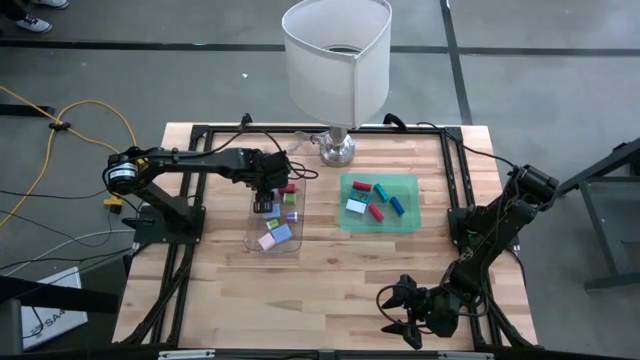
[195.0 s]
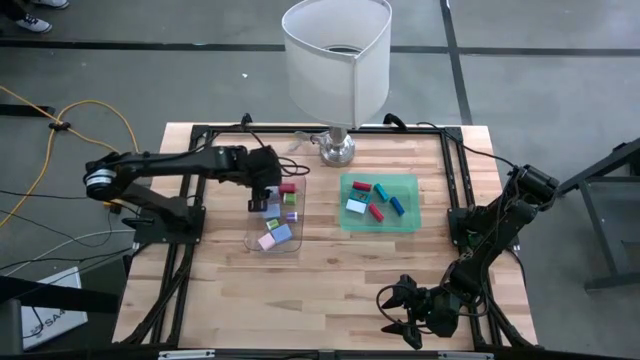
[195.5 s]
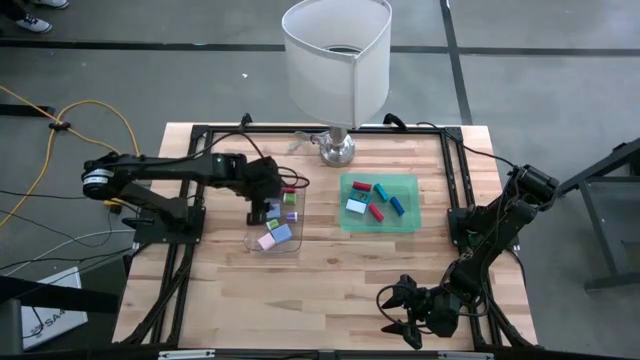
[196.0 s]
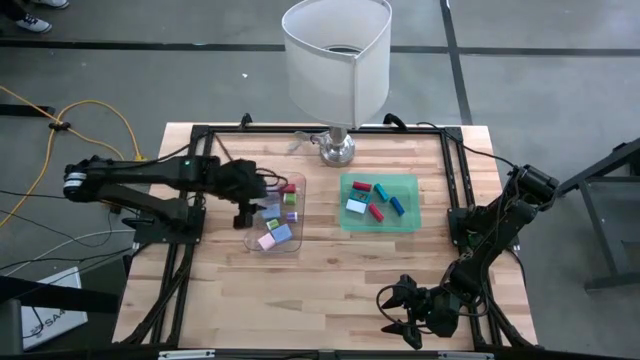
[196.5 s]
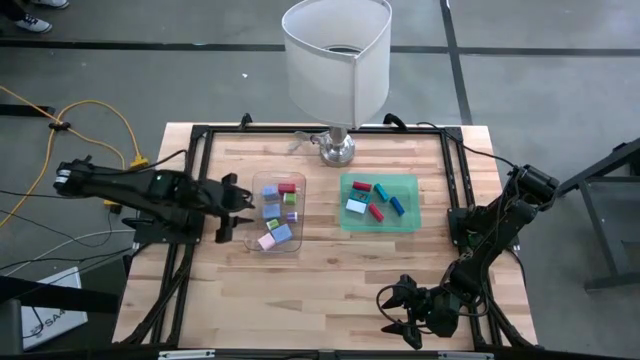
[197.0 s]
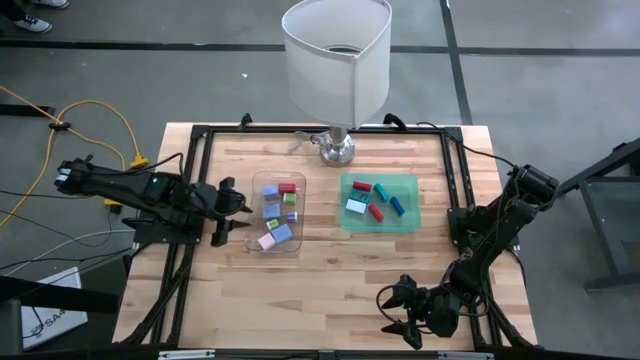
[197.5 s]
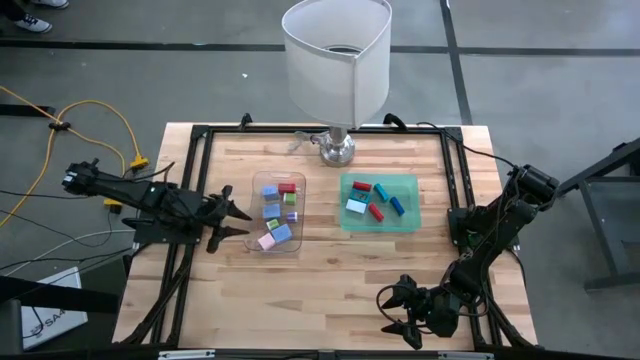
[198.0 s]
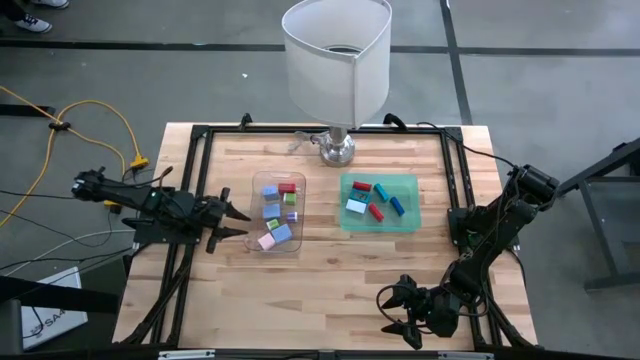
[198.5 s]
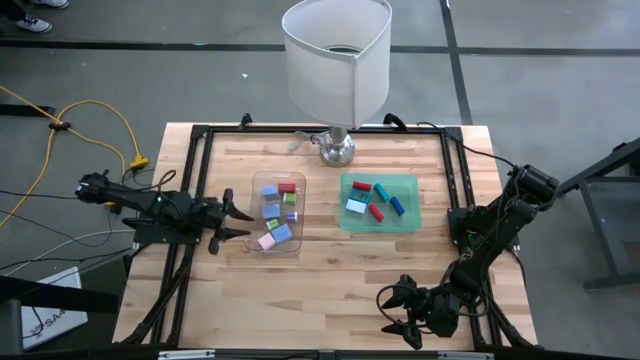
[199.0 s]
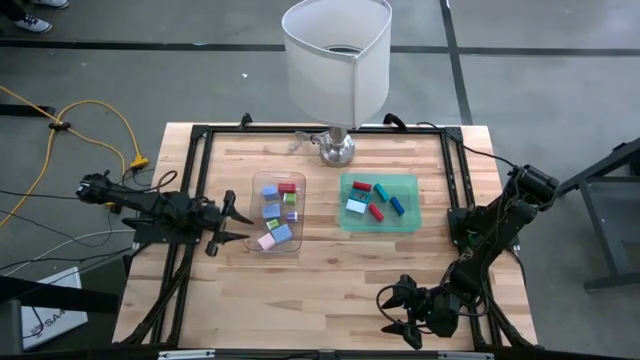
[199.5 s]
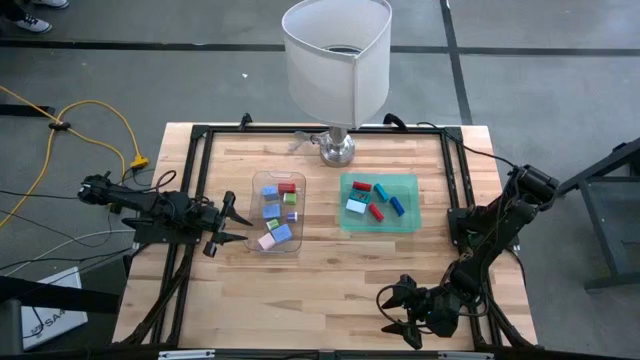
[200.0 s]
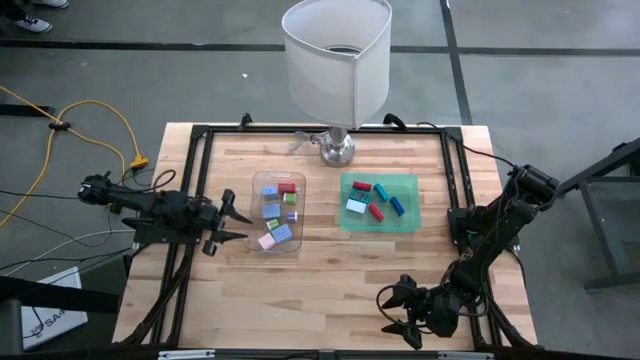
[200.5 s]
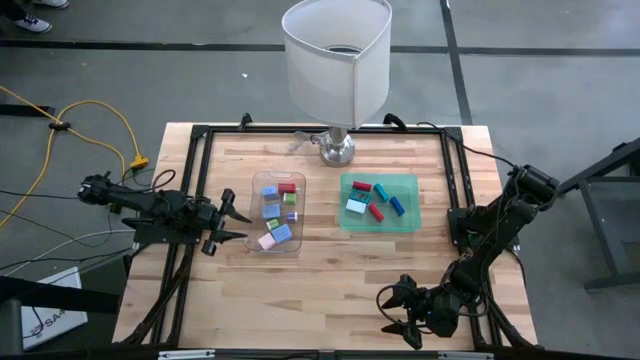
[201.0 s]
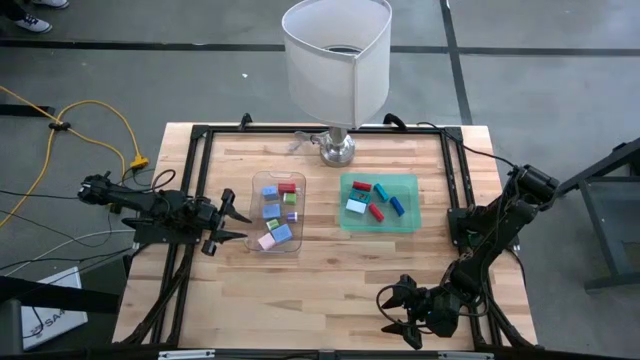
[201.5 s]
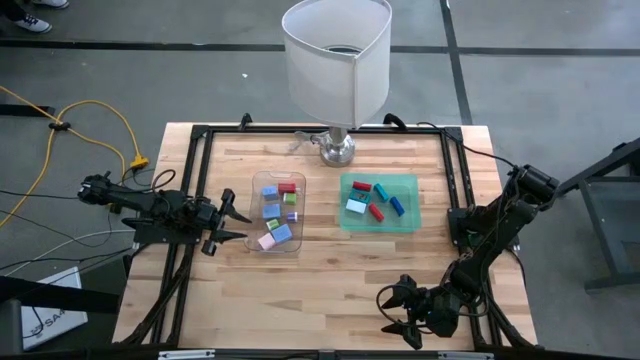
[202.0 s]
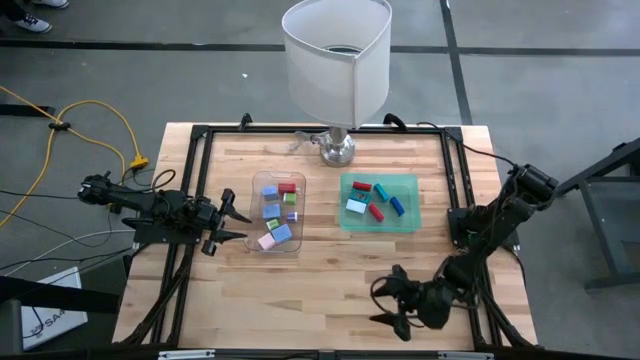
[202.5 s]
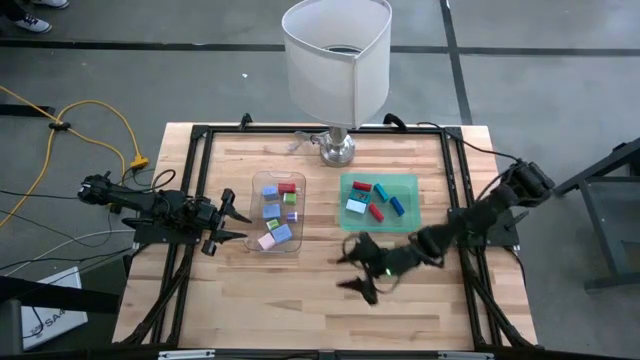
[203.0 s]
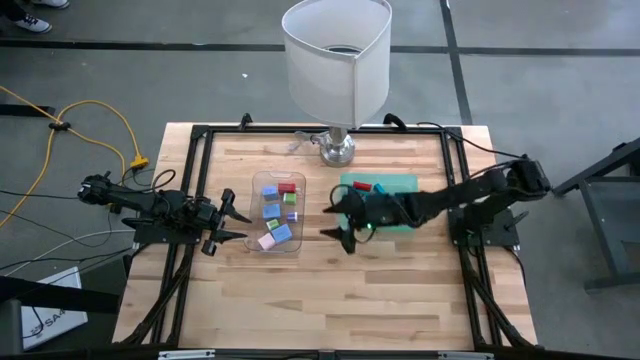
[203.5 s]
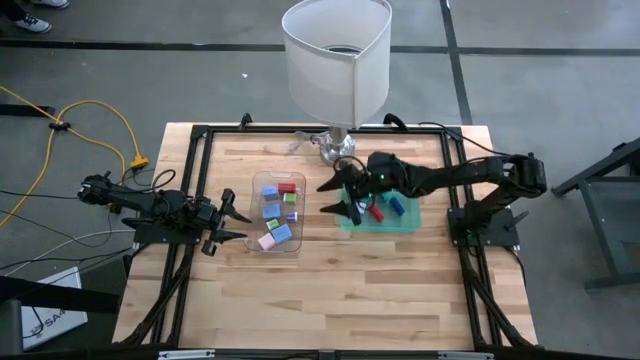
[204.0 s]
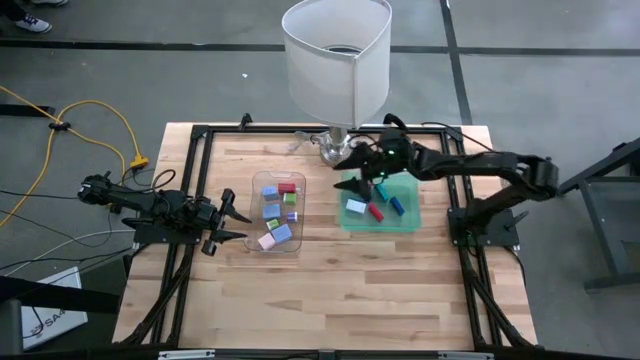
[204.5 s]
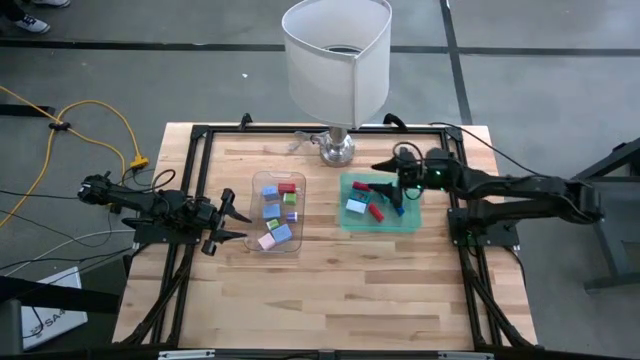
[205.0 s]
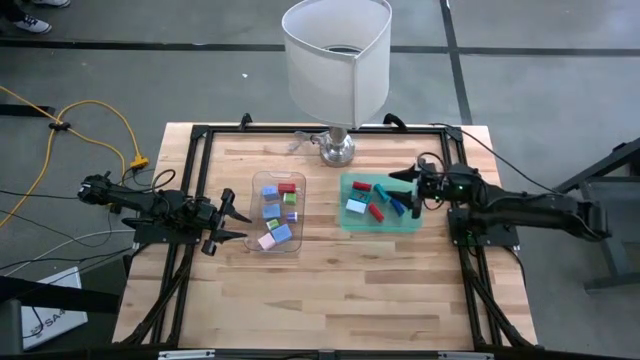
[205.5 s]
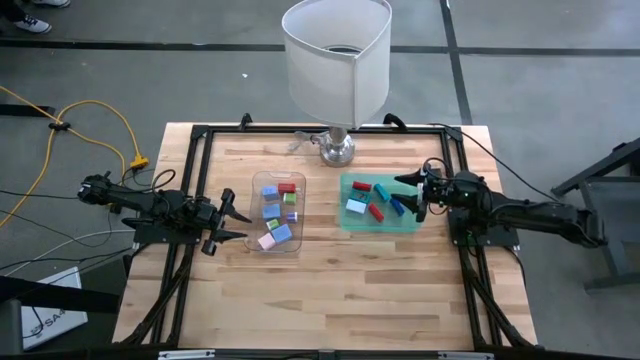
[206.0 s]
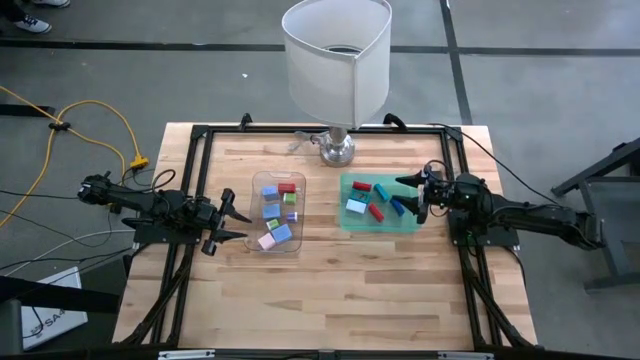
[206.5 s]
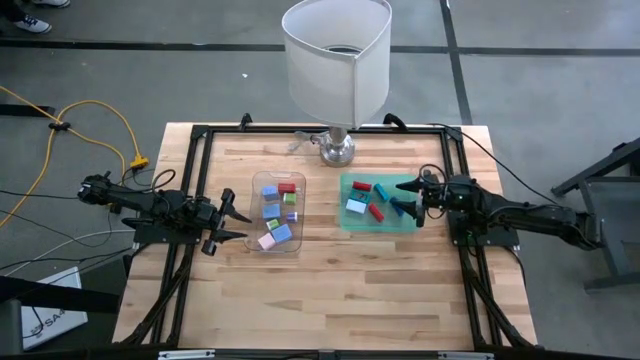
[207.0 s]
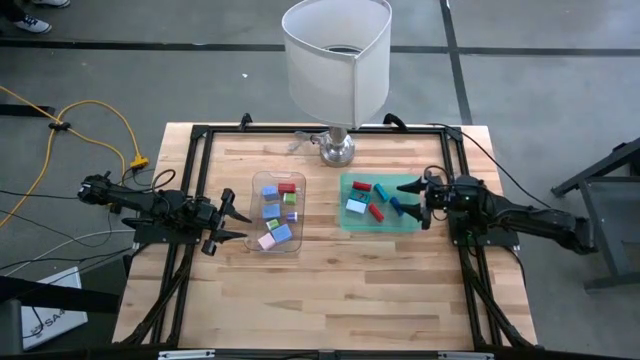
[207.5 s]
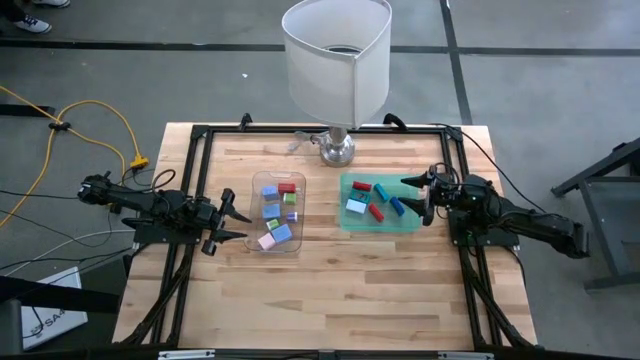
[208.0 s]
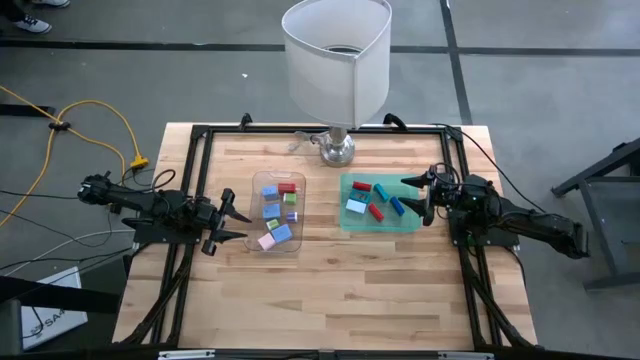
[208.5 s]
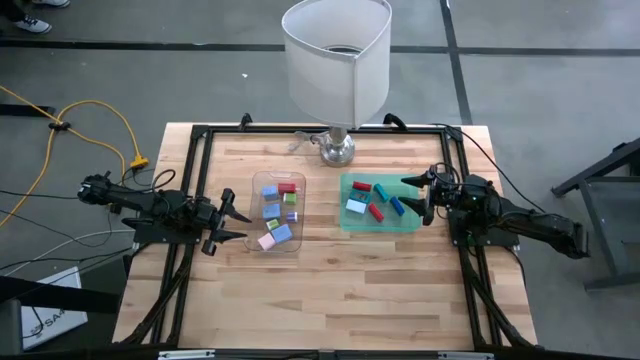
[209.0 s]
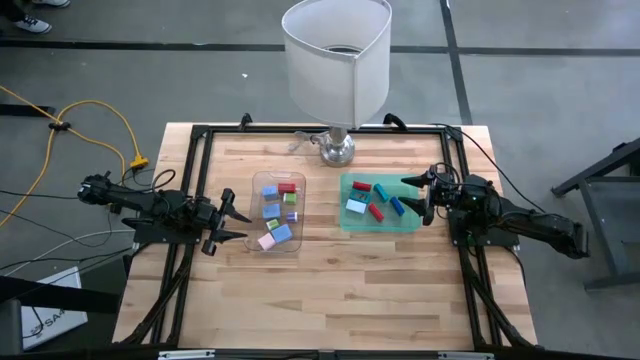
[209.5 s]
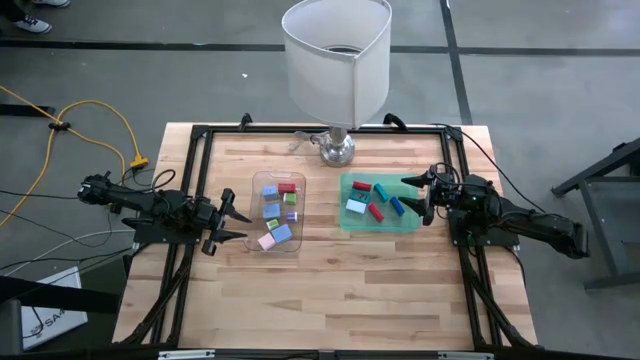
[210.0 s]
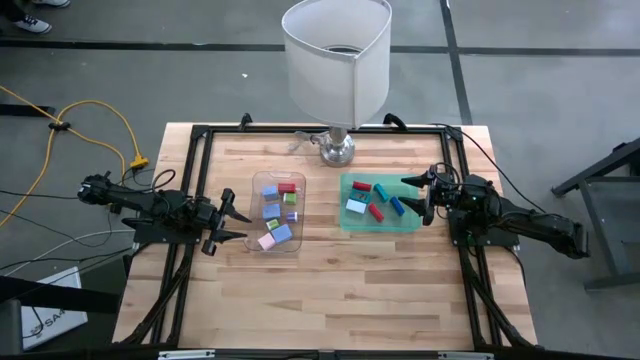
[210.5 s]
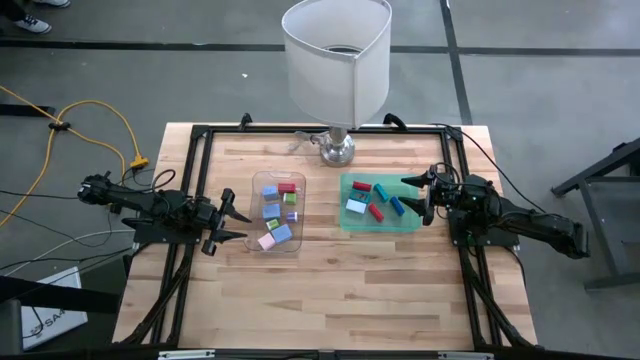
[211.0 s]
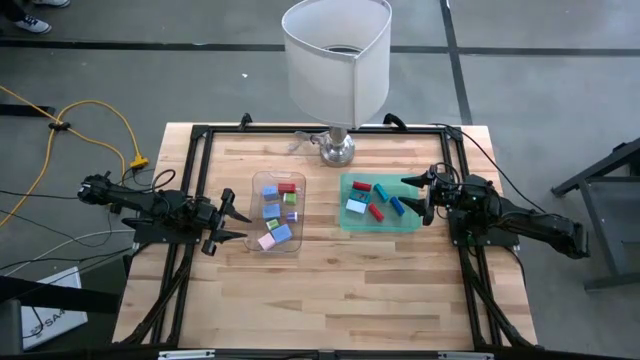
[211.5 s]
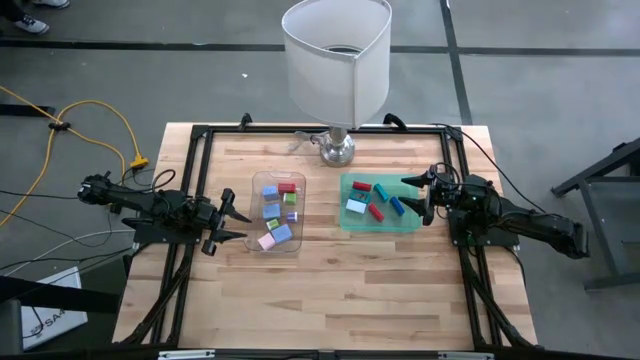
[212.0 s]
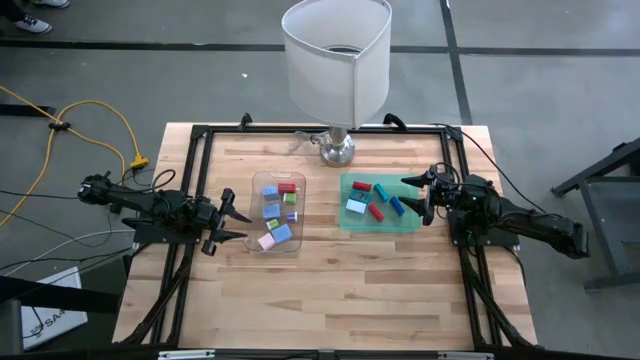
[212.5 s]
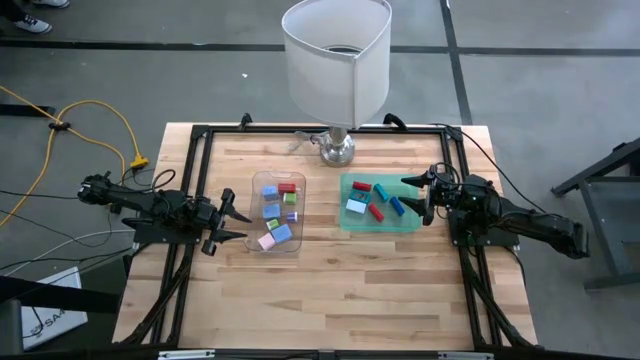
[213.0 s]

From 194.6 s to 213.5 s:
Task: Pick & Place Office items
Return to Home Position

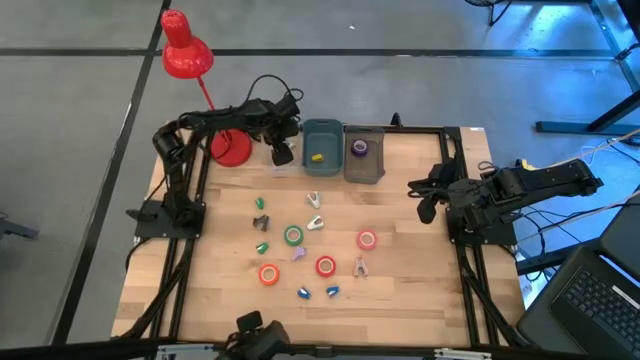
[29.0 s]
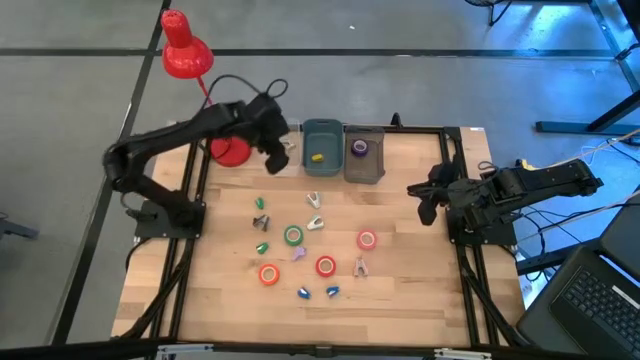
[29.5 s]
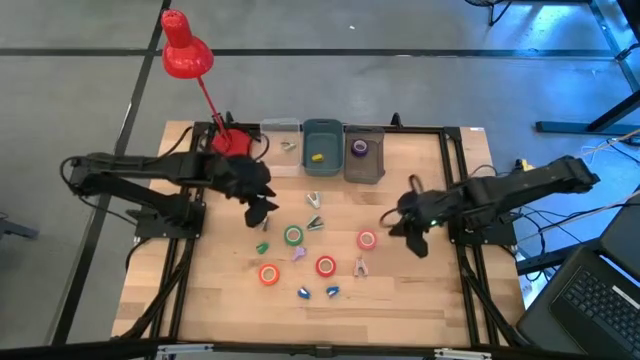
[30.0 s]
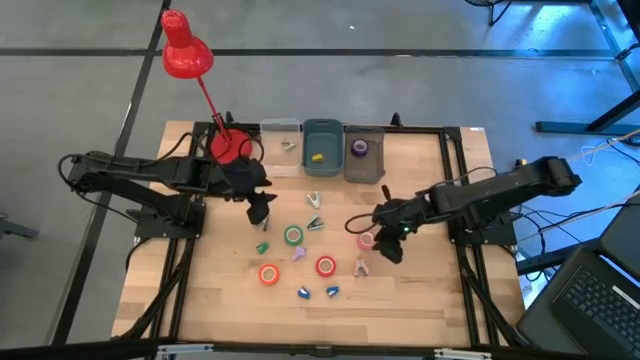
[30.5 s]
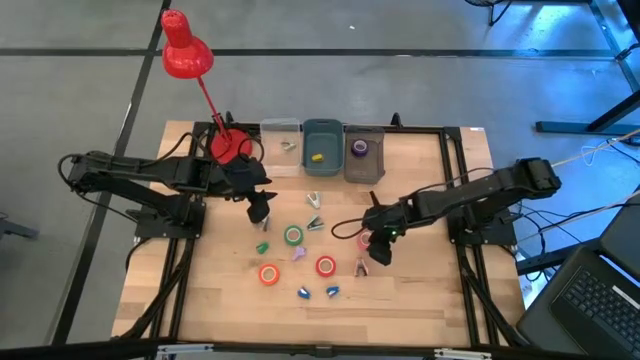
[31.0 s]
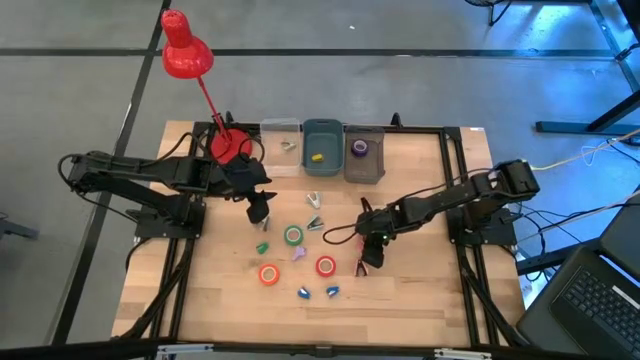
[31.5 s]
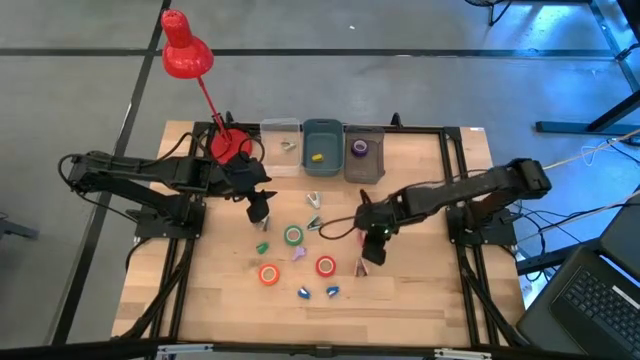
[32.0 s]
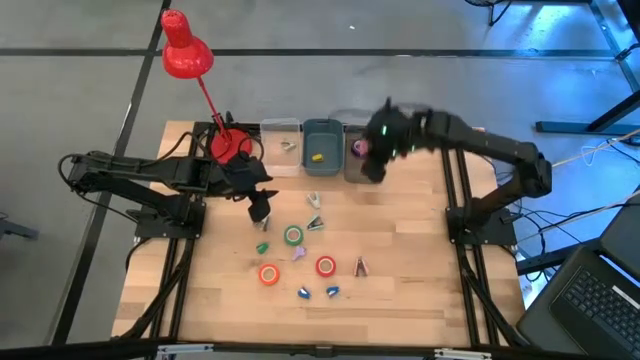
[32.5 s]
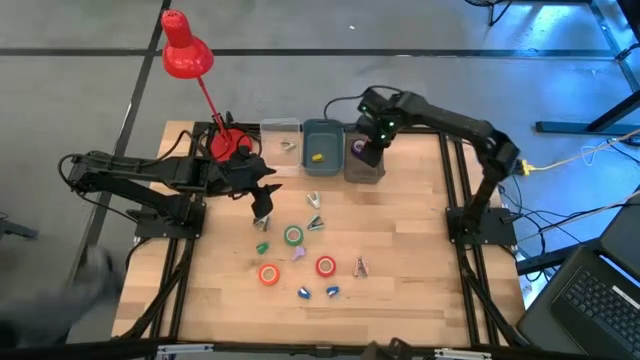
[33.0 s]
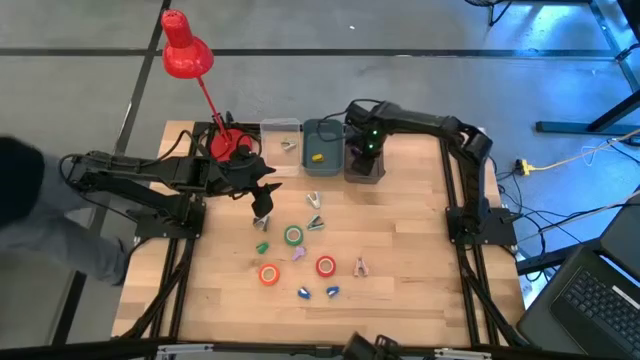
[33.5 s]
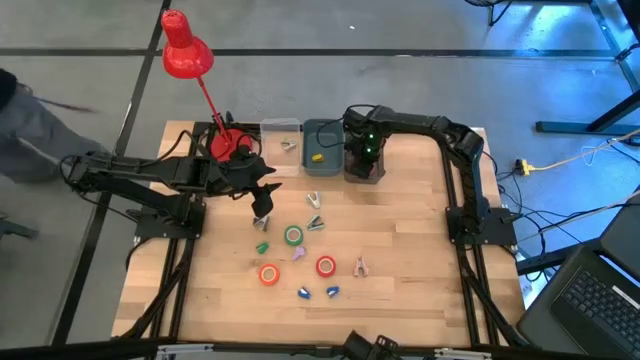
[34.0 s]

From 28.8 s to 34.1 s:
Task: Pick and place Stapler, Stapler remover, tape
Put the pink tape into the black bin
